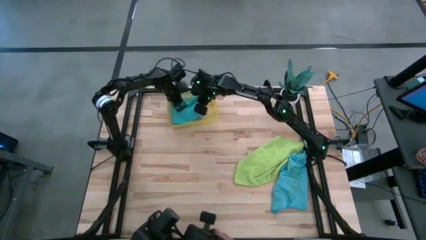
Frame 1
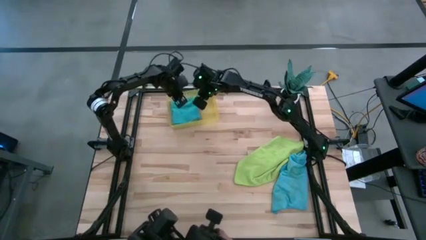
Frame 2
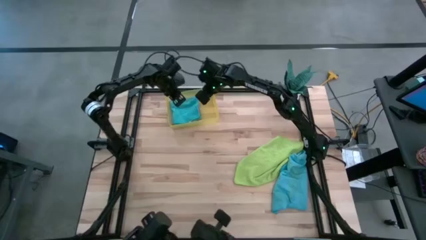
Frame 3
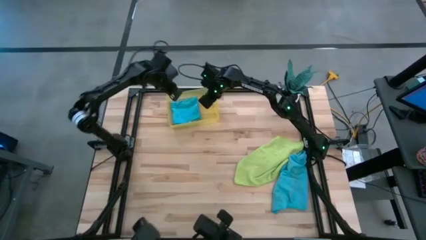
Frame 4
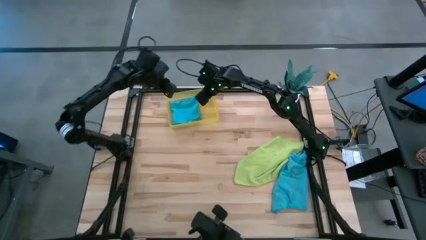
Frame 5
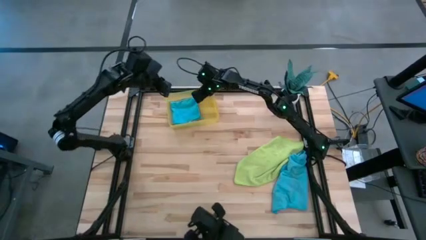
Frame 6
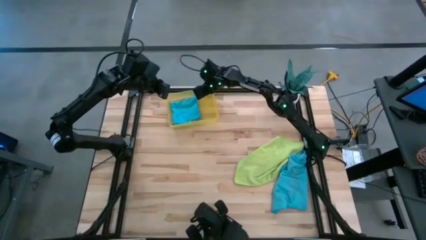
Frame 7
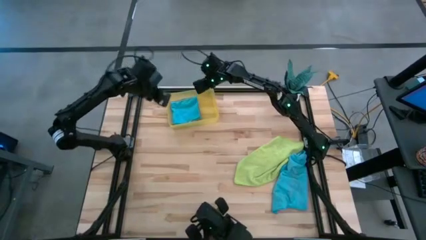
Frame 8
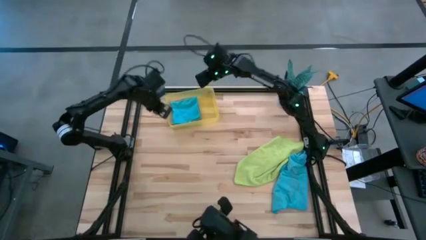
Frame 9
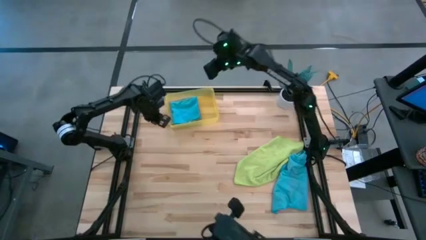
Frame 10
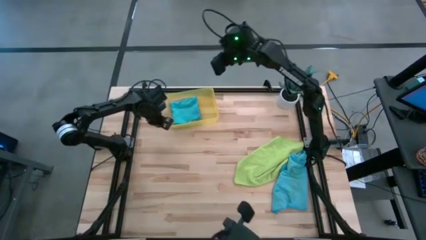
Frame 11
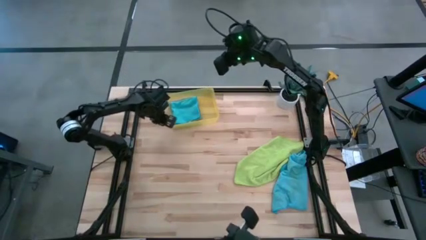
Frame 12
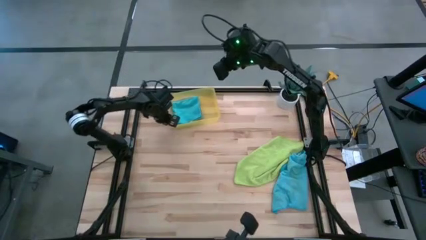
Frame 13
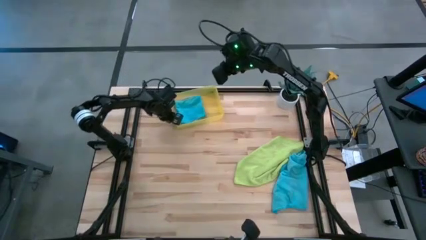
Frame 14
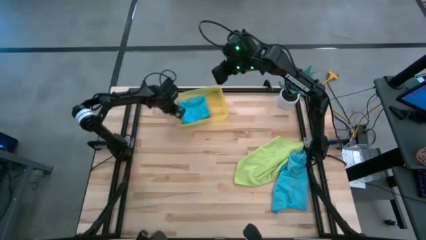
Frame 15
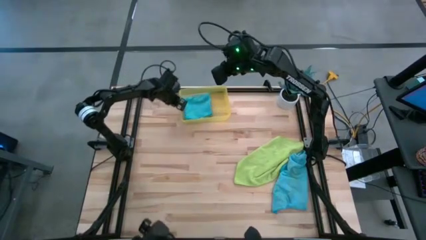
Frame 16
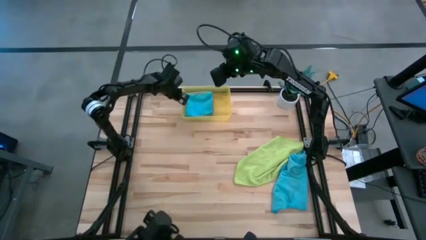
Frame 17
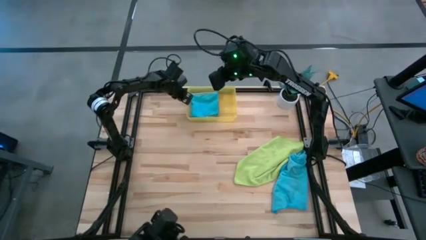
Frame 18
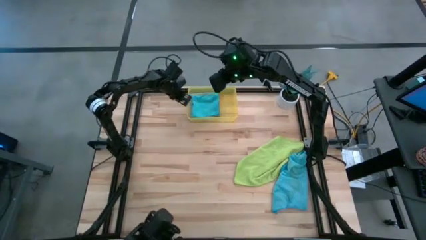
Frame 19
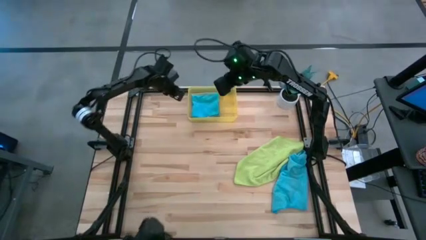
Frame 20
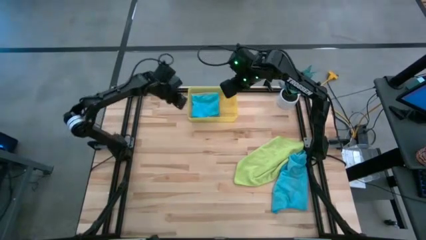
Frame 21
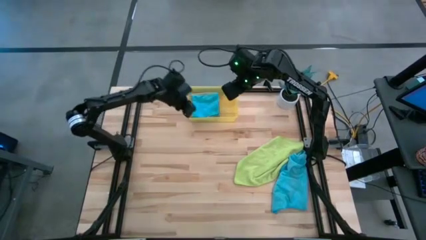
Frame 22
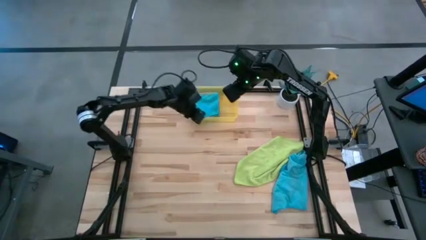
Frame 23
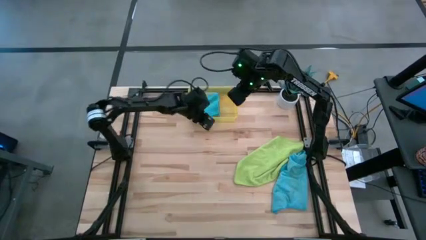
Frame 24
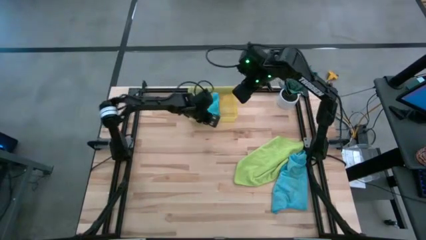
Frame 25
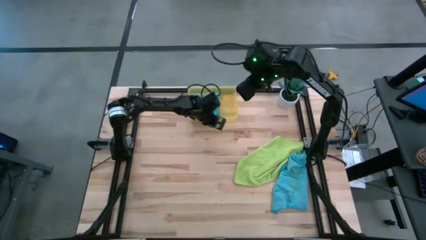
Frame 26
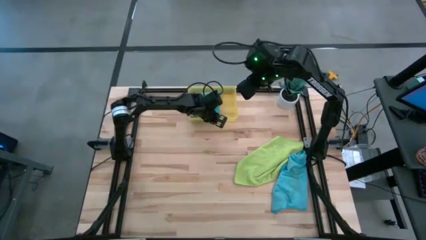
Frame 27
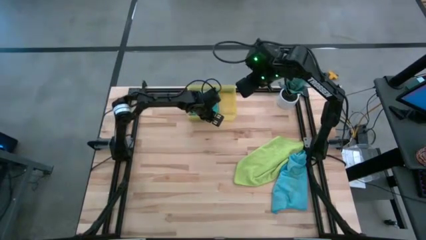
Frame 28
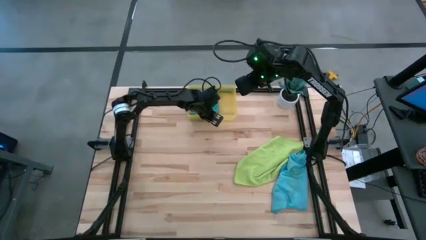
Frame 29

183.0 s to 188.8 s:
Task: Fold microfiber towels
Adjust the yellow bin

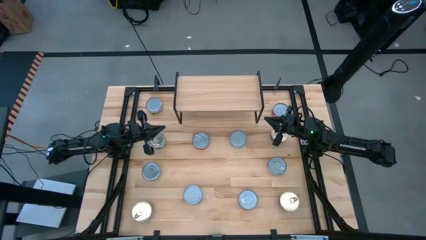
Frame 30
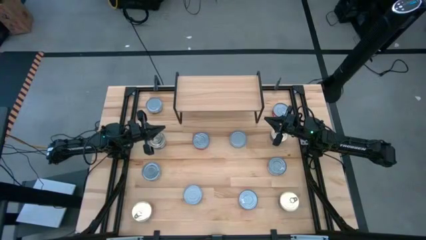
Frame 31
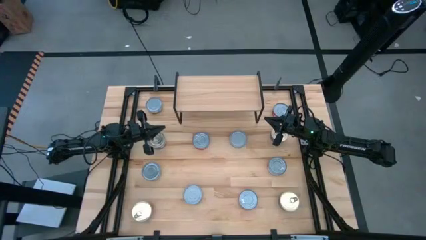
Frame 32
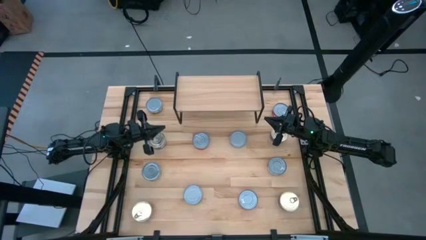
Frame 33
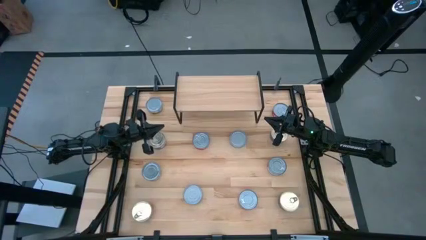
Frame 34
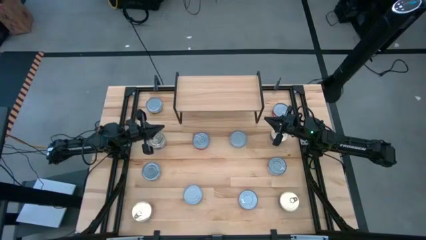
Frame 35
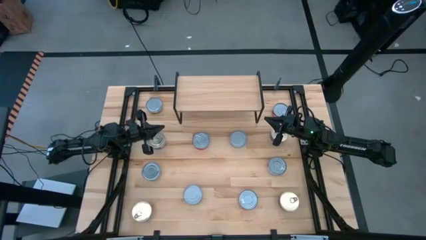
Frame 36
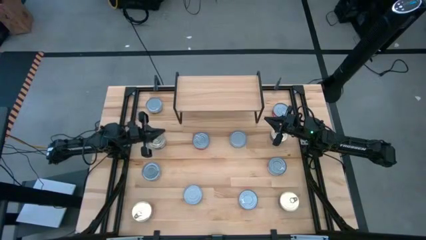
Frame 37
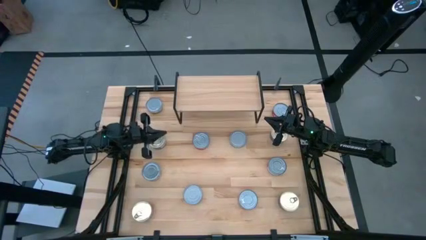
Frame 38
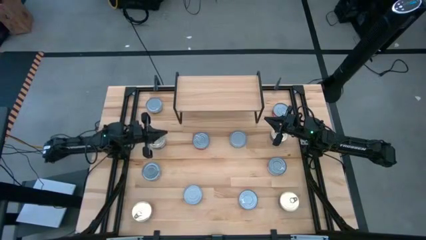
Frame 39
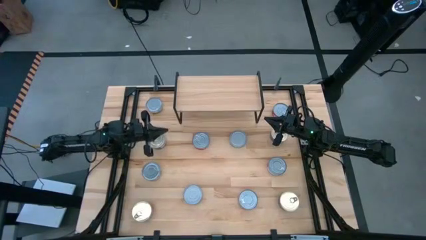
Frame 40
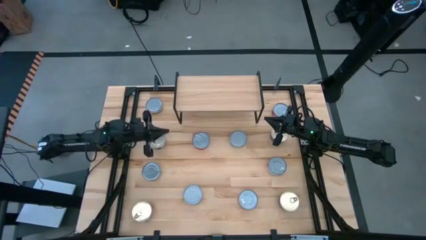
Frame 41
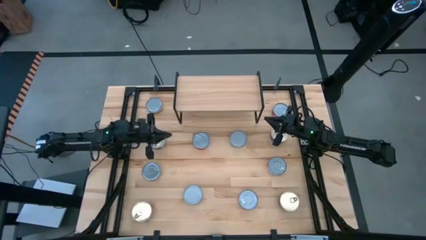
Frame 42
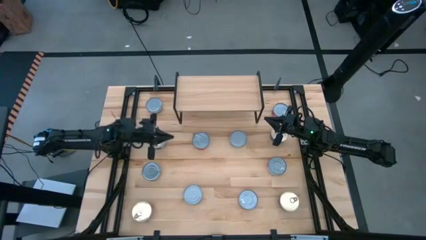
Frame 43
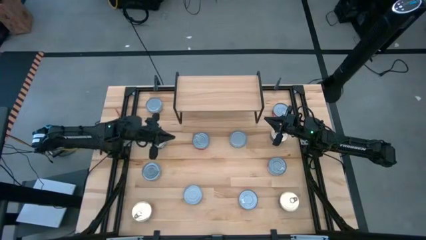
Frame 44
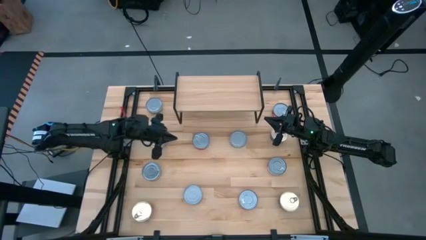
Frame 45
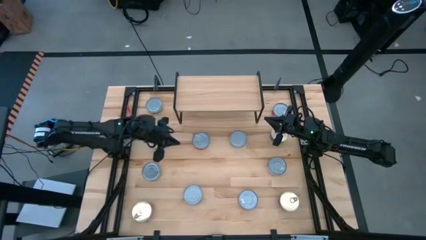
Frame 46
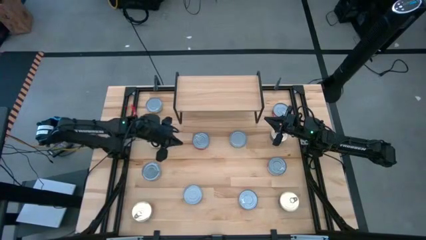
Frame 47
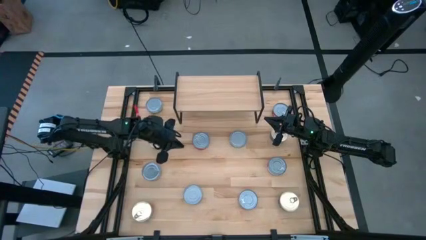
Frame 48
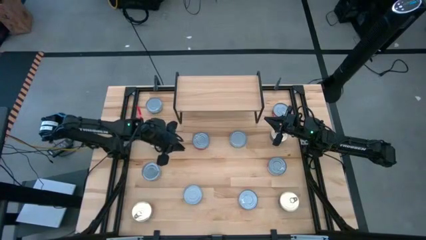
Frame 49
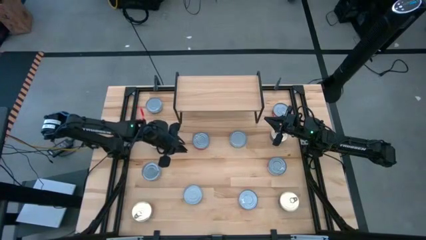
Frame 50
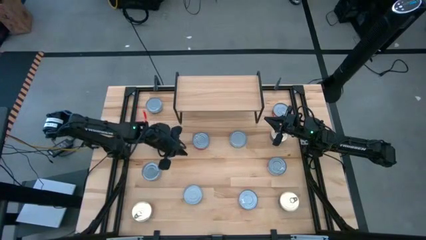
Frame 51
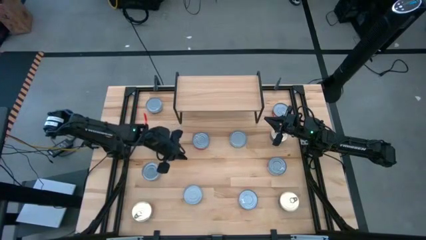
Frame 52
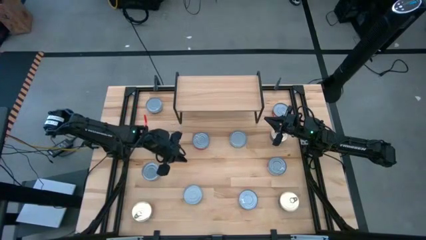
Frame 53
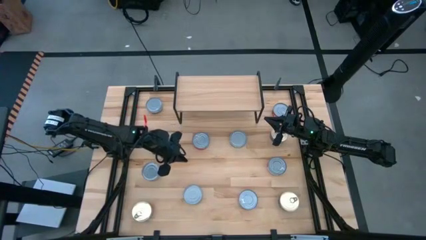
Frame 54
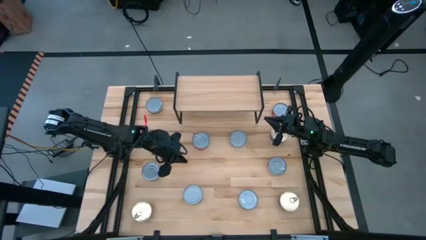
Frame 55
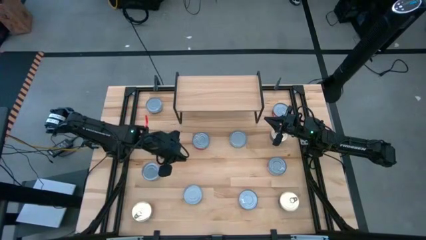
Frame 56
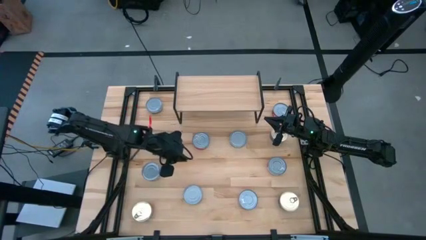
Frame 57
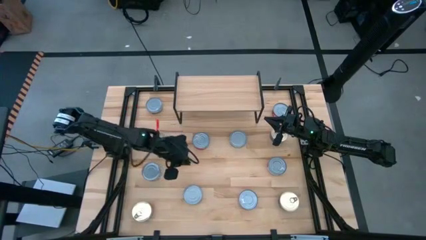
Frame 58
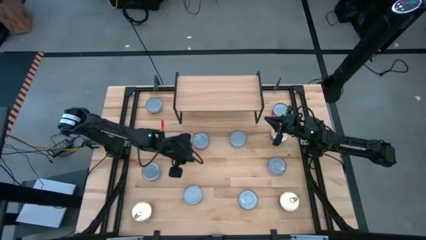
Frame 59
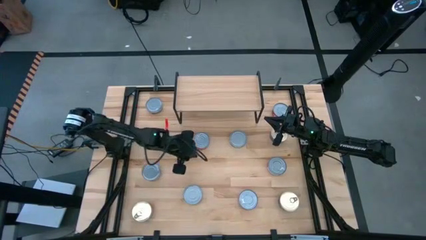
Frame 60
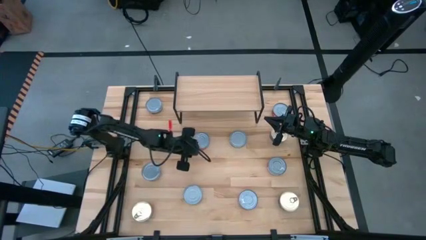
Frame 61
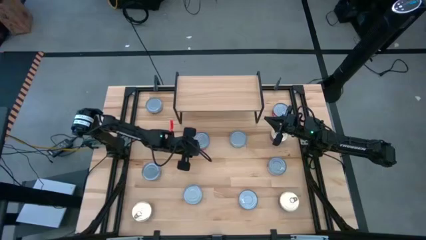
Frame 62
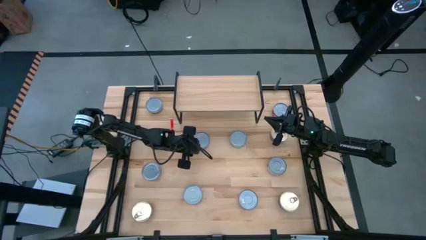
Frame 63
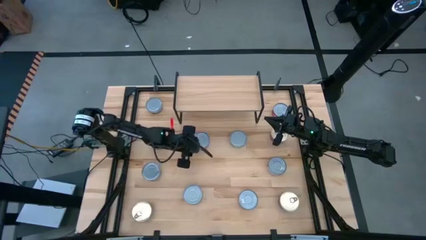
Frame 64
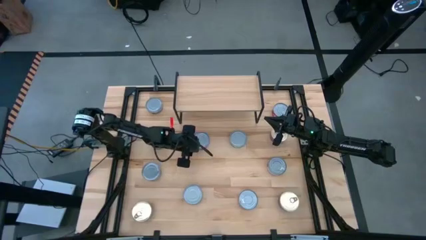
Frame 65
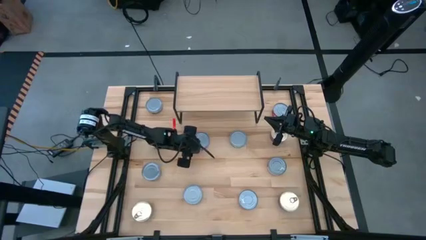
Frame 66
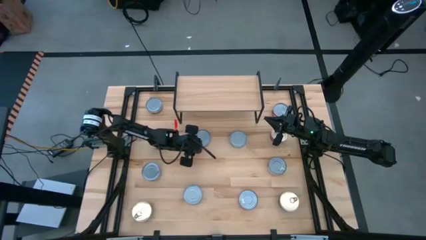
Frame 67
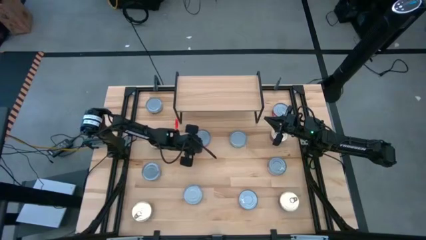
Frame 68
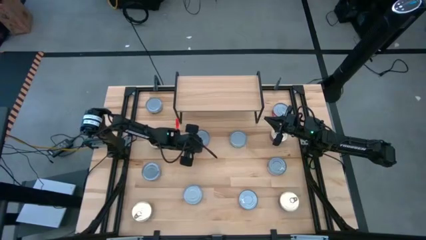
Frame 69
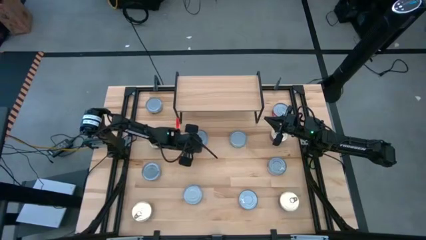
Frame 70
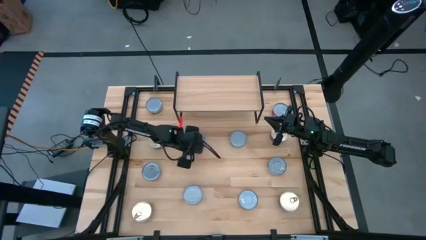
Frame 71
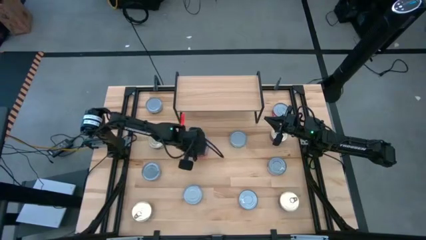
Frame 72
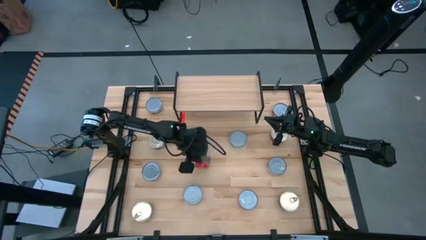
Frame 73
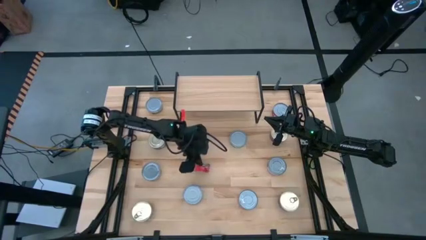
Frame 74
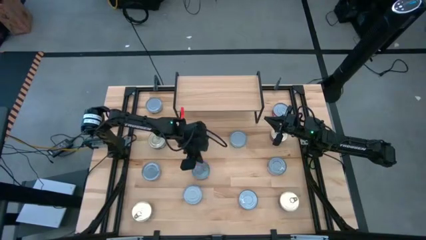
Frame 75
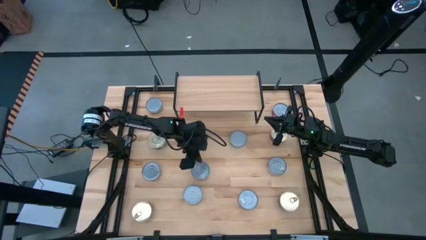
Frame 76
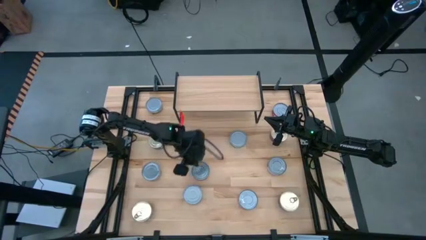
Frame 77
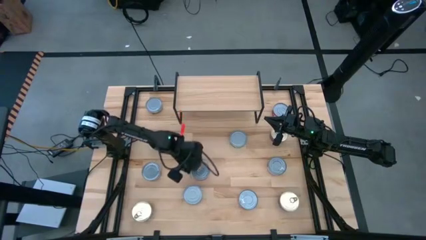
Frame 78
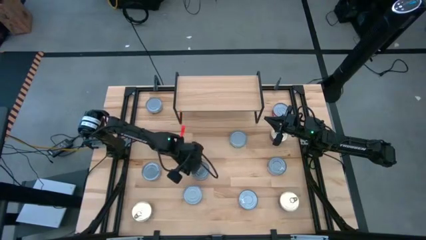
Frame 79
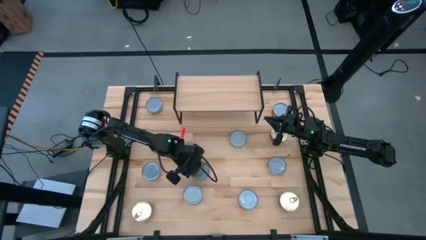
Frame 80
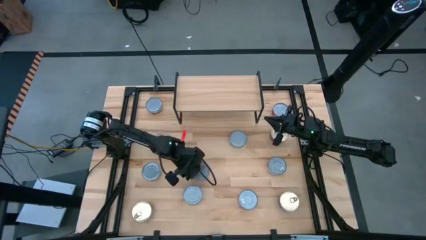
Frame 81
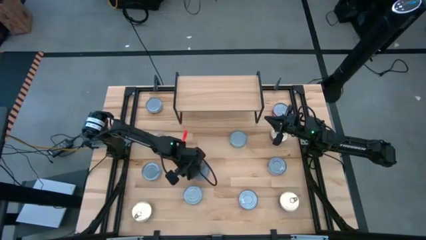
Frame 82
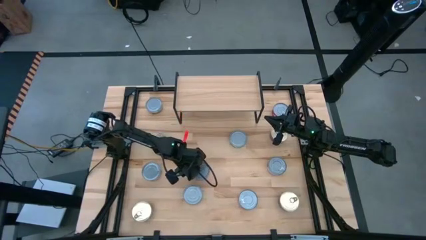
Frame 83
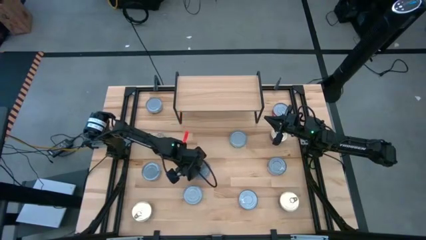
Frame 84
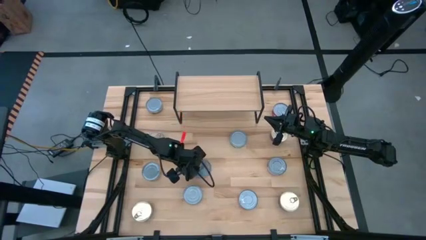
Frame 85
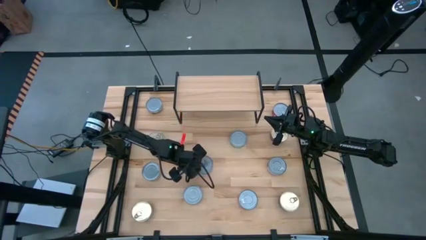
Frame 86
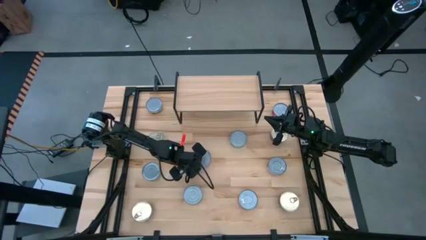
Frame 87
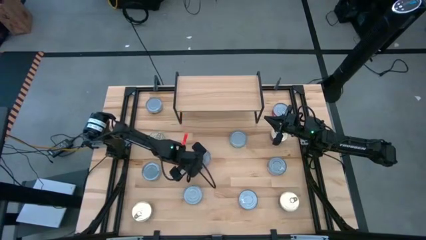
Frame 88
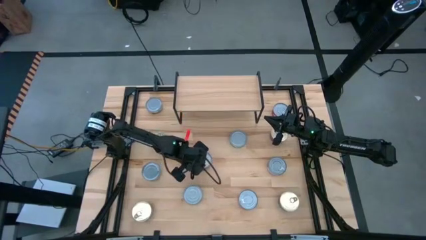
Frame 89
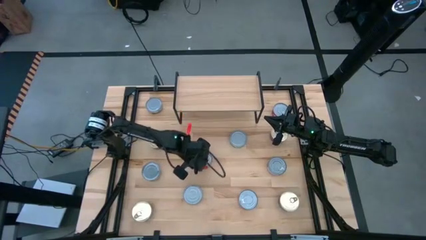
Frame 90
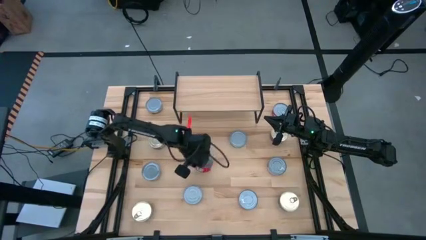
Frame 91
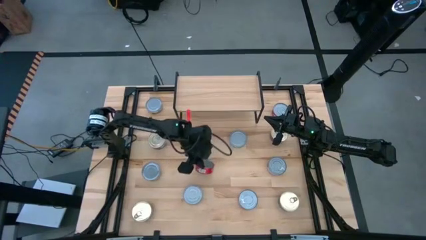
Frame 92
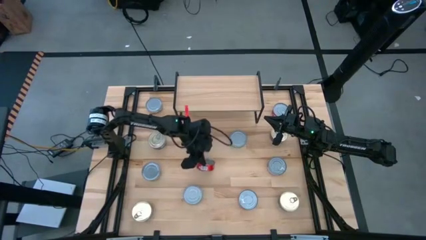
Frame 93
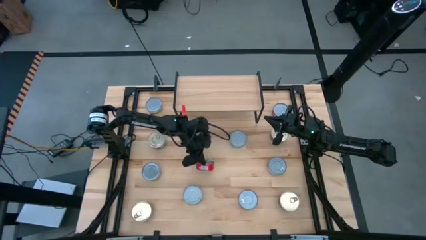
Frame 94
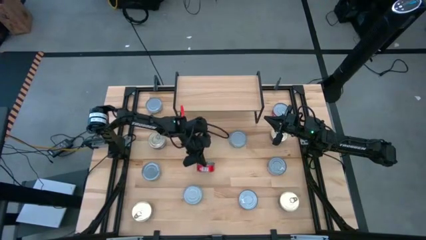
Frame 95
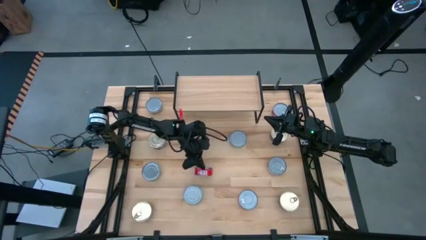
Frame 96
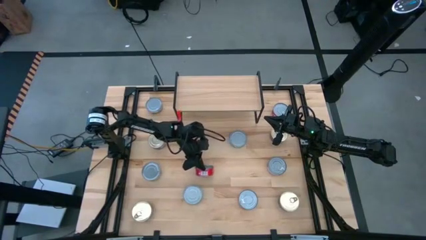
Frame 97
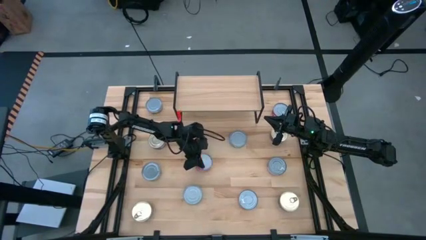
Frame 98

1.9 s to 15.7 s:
Task: Stack canned seafood by type on shelf
Put the red tuna can on the shelf
